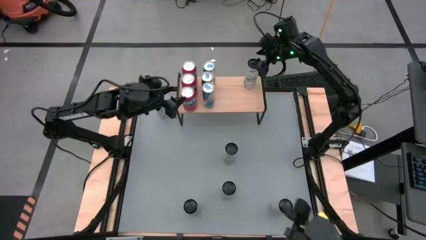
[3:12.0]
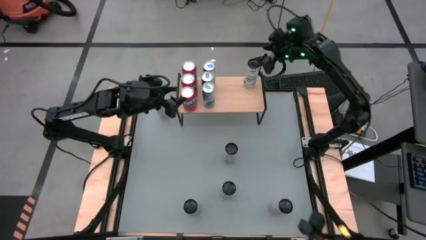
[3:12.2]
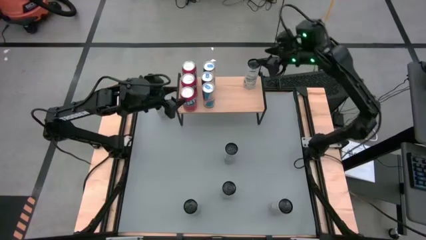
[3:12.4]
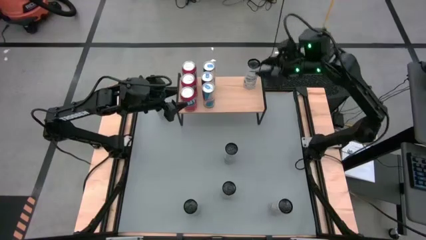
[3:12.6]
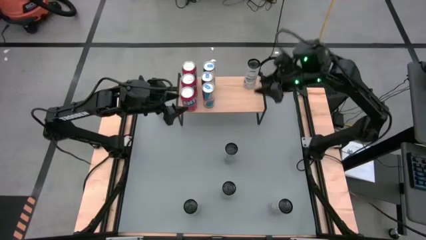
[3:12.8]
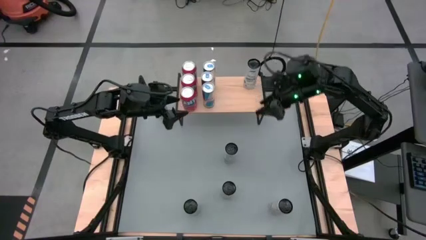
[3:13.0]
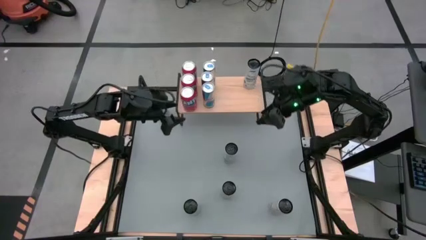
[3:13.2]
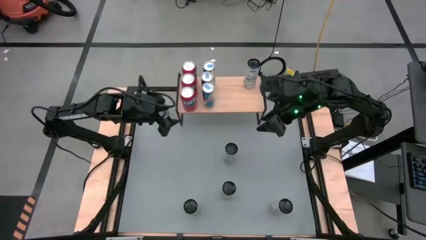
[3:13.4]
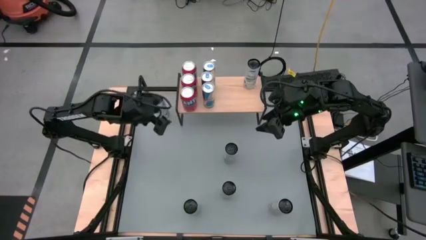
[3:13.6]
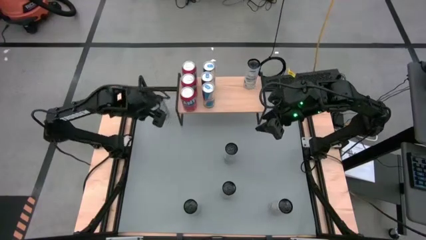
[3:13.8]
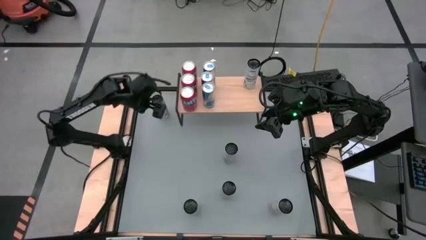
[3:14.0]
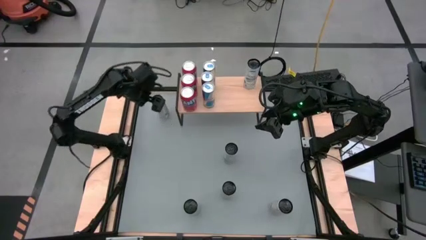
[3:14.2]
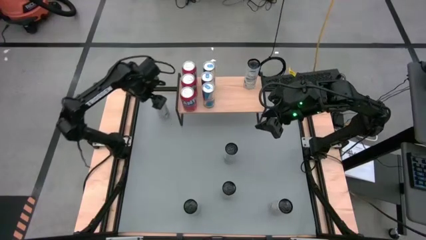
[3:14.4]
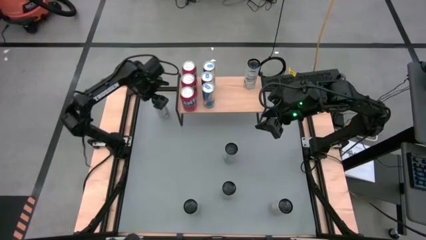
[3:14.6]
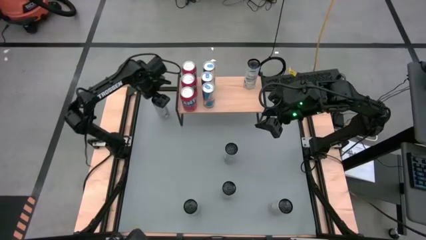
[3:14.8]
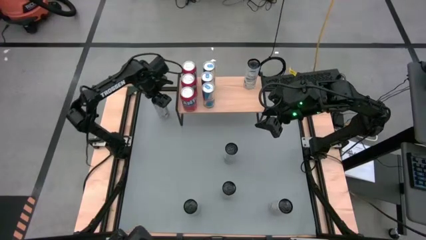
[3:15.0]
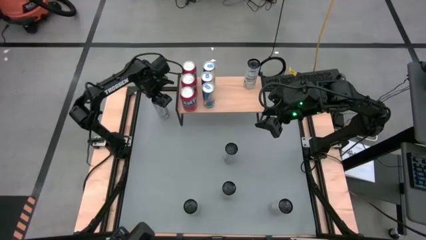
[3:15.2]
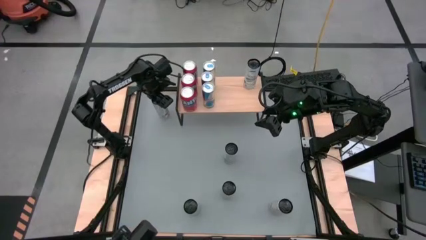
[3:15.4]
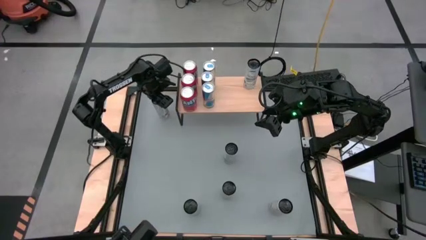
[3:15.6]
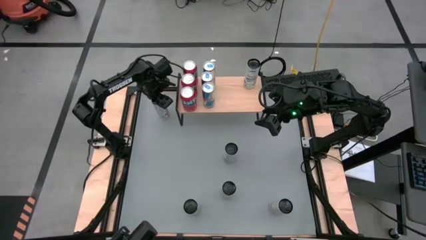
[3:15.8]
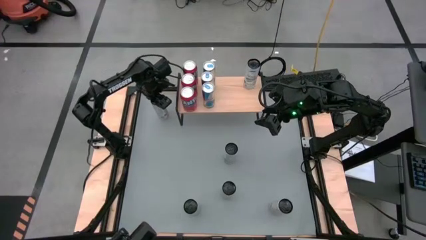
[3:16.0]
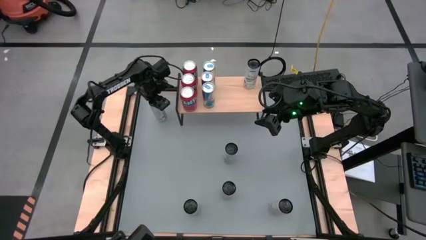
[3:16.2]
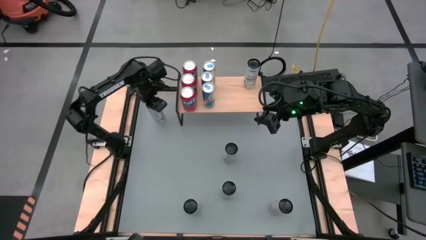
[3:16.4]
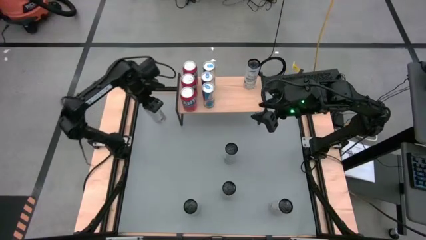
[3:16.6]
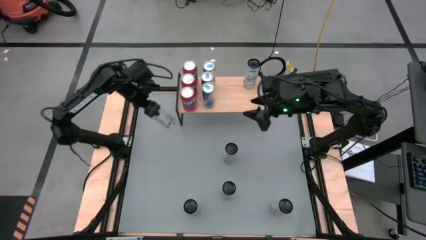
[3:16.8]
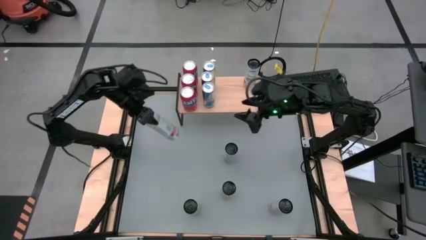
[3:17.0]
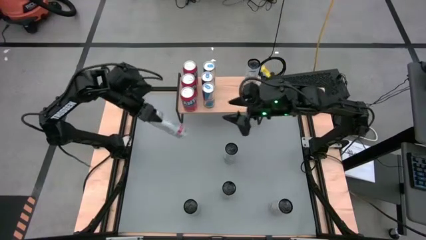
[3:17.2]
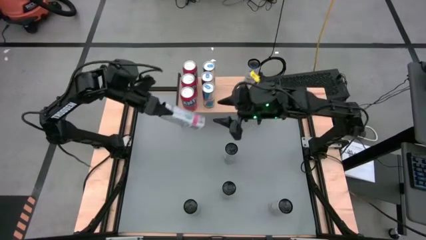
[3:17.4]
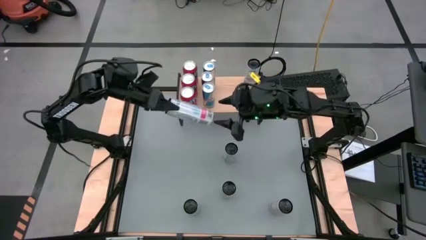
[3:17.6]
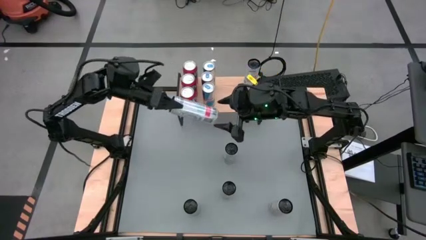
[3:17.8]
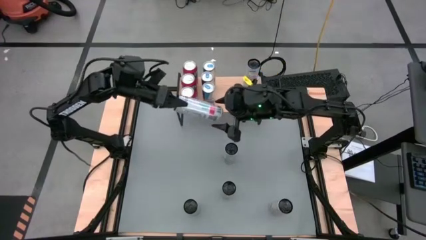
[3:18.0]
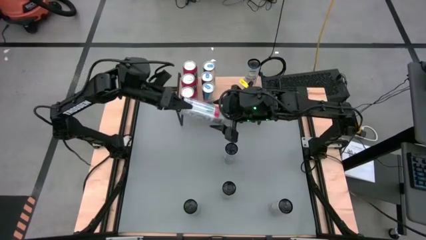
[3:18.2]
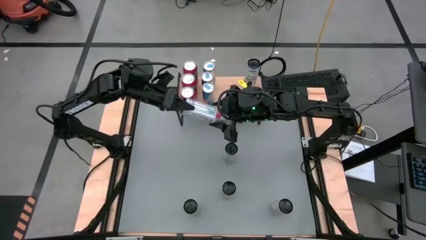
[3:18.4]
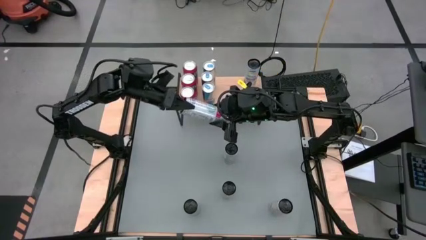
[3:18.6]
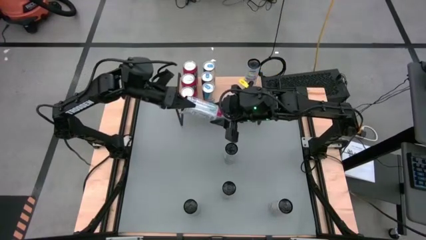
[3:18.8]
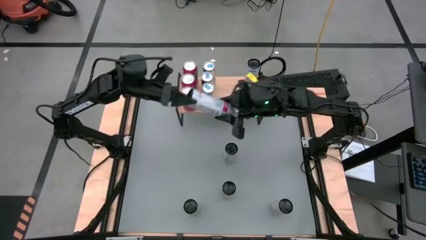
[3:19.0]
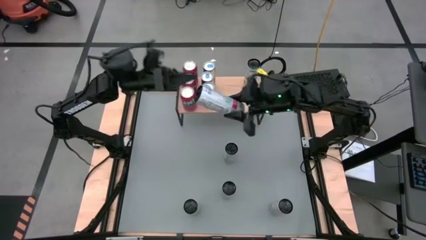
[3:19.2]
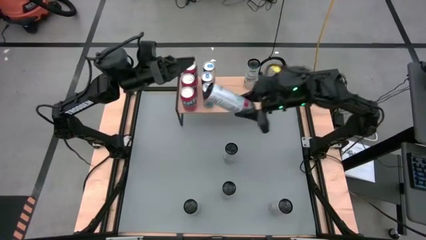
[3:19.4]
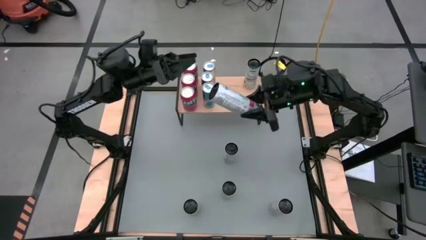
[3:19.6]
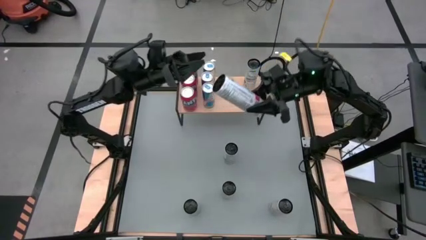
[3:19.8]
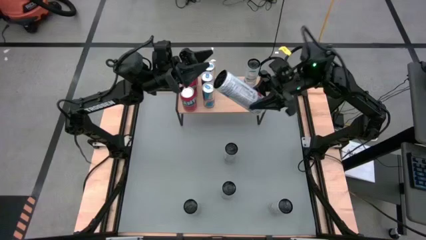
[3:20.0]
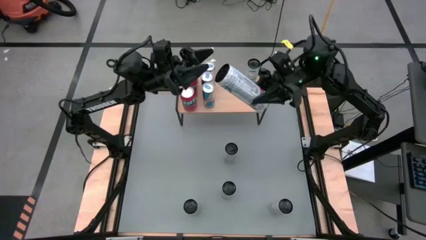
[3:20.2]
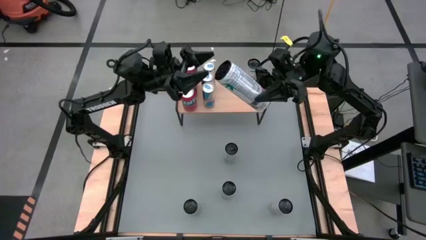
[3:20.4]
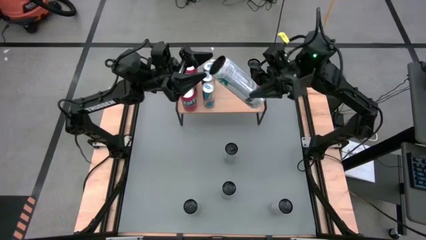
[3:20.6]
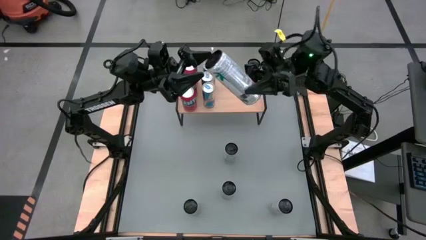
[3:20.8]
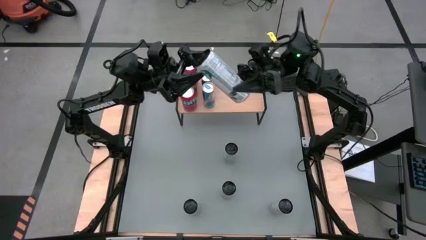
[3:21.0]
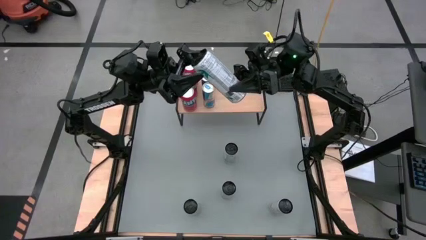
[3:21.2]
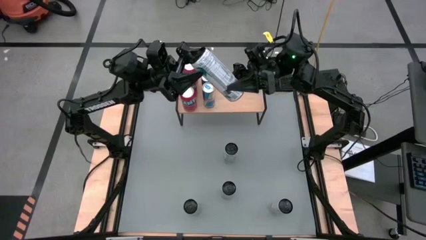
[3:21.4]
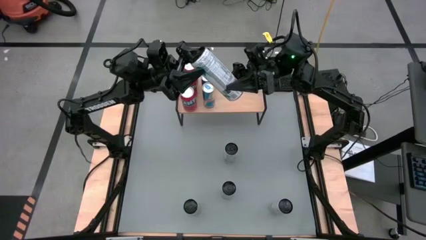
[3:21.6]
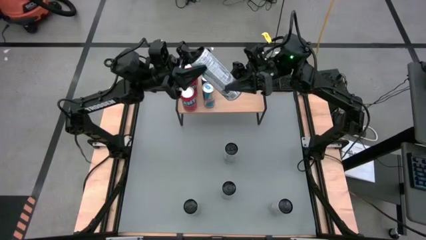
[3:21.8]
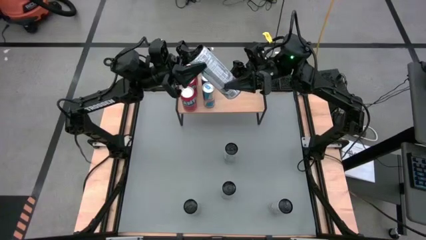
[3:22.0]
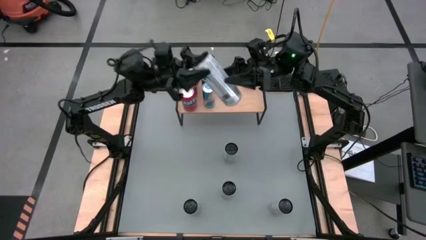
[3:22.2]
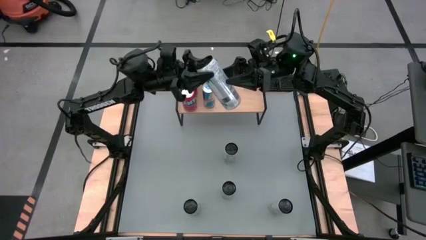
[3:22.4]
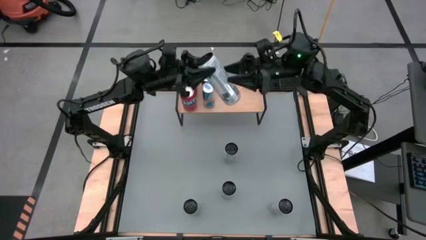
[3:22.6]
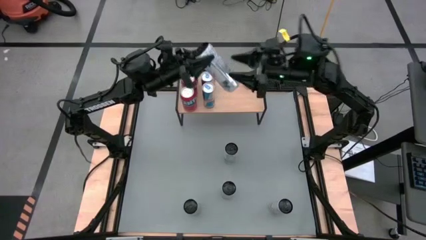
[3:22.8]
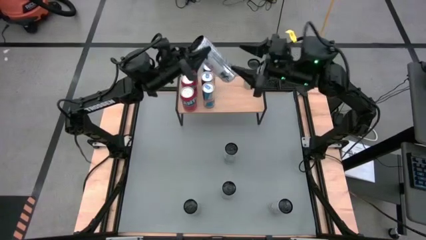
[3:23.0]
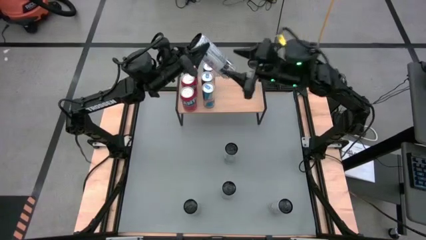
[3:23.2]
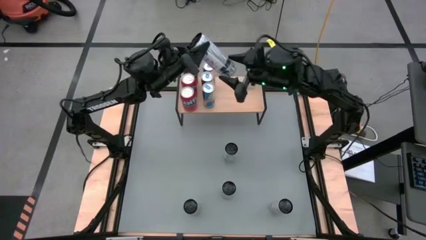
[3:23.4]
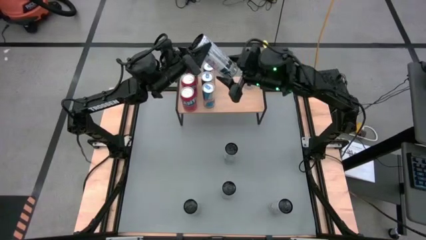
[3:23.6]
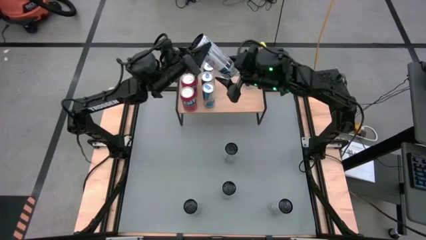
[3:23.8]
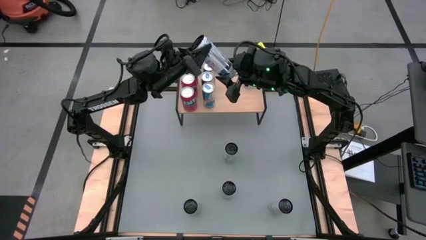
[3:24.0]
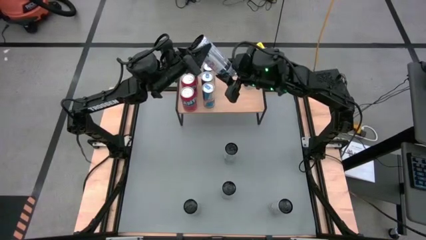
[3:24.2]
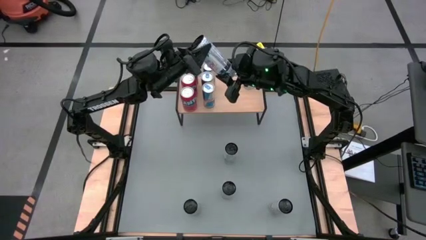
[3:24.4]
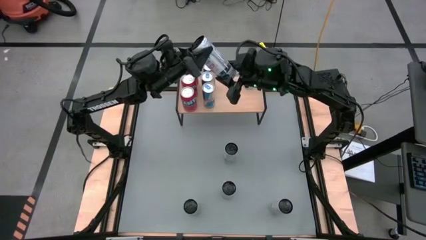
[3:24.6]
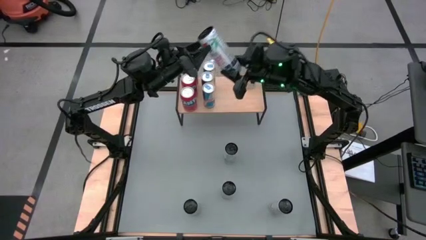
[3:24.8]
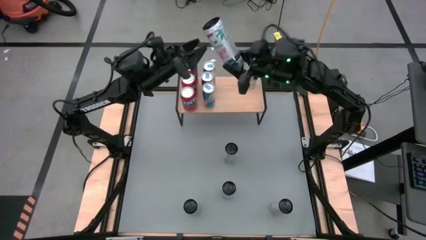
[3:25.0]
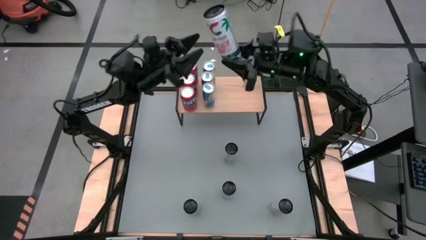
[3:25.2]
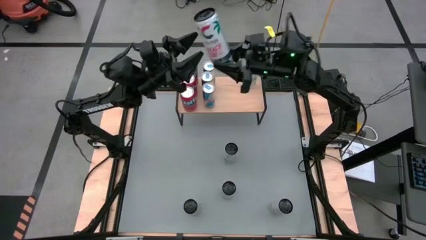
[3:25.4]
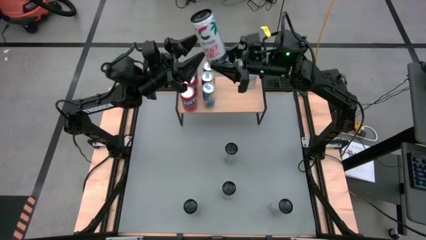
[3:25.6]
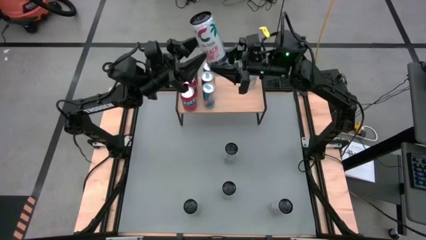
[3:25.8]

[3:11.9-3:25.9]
Task: Place canned beverage on shelf
Put the top left white-pink soda can on the shelf

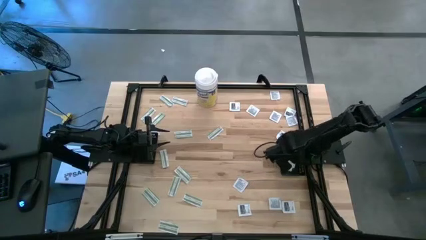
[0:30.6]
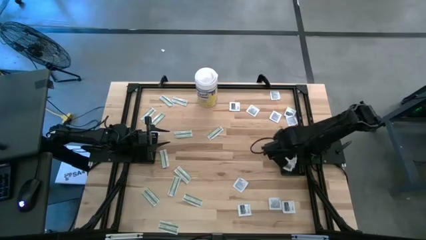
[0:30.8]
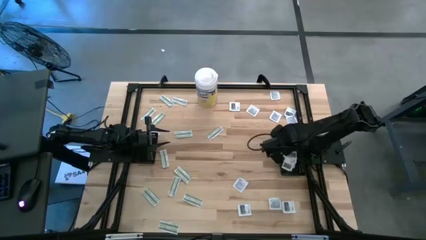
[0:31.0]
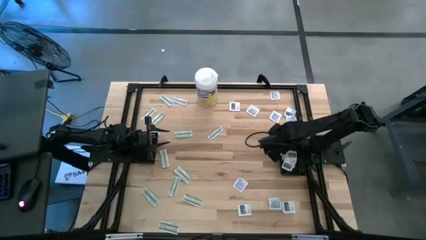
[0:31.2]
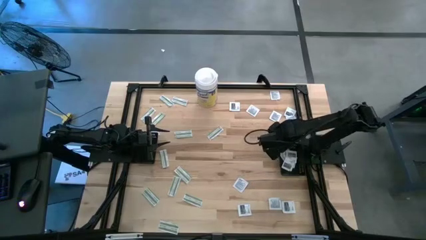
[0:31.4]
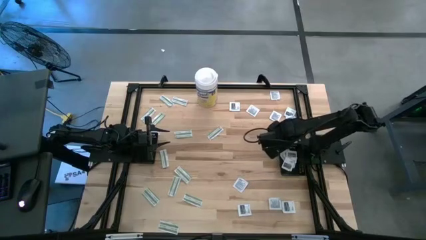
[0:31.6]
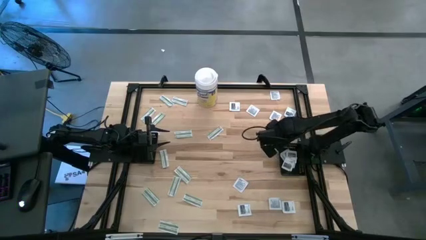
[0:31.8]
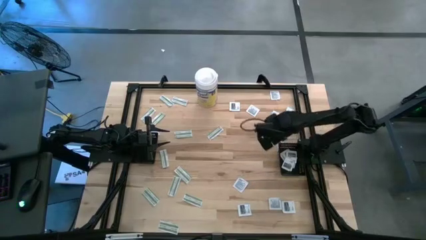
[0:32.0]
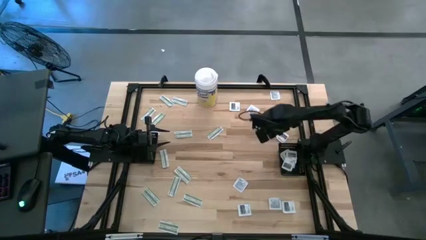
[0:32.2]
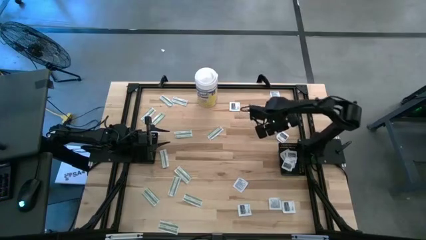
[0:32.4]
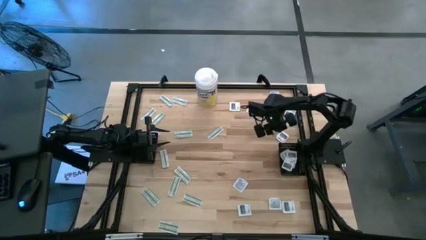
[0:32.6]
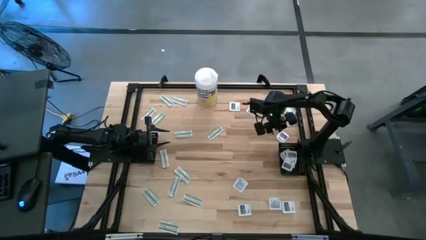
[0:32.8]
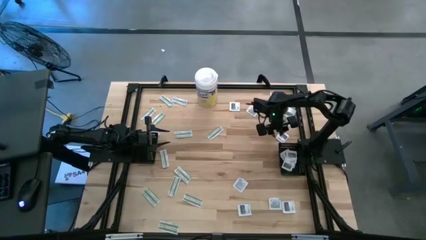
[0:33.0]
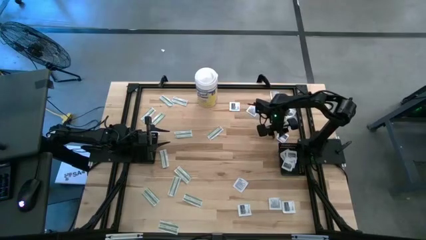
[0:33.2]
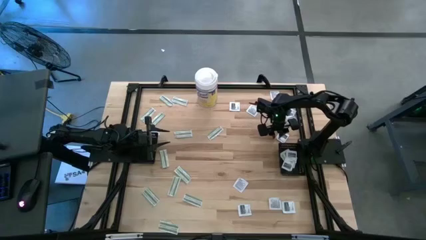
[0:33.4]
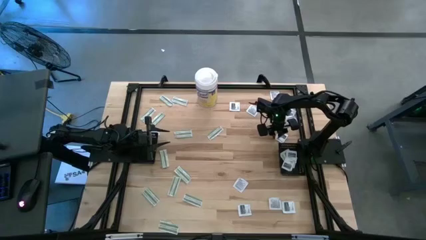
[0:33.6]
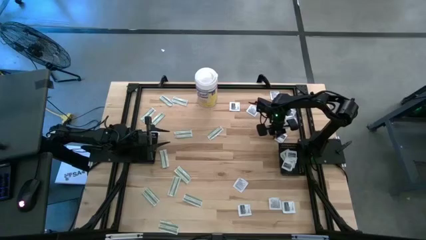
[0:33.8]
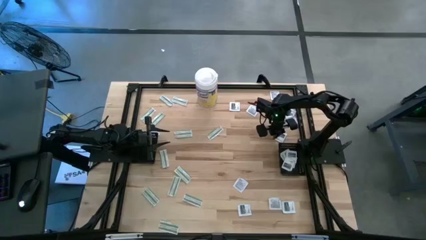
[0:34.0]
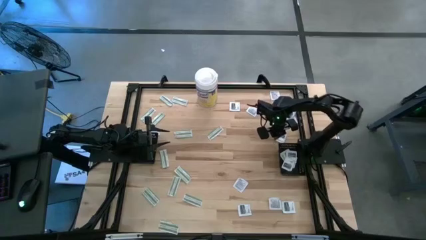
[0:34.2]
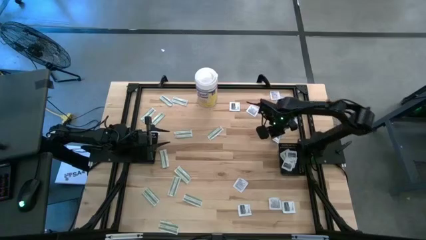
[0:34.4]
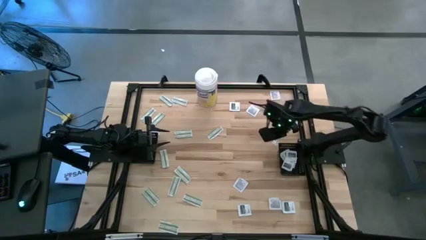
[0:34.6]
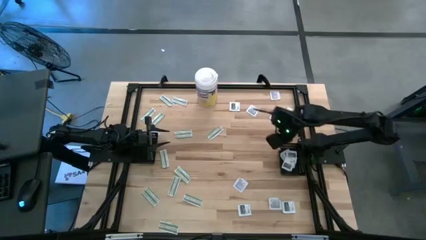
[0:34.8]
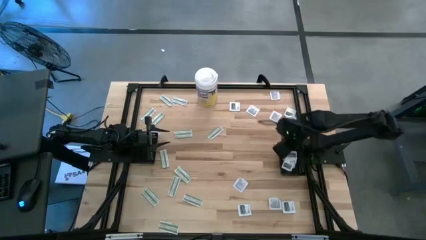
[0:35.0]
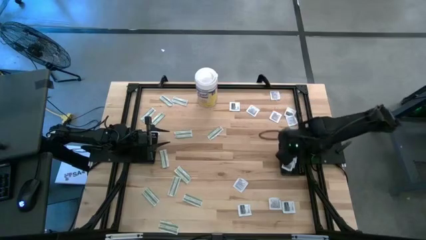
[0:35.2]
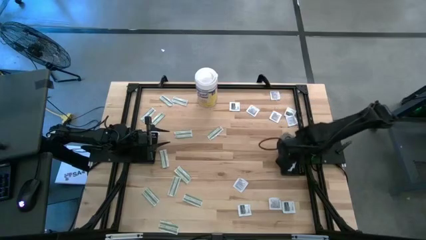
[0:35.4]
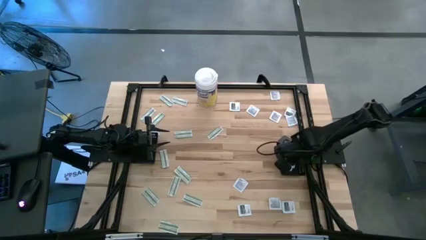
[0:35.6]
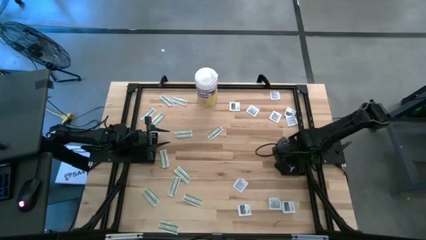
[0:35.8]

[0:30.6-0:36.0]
Task: Pick & Place First Aid Supplies
Put the towelette pack into the right black basket
